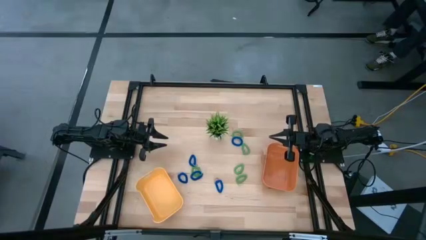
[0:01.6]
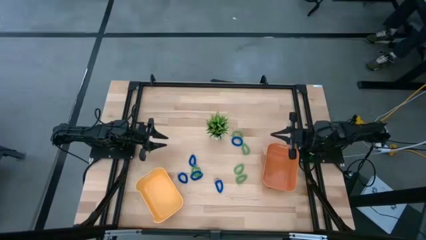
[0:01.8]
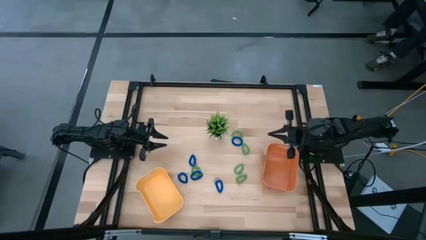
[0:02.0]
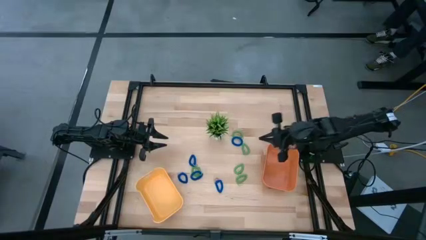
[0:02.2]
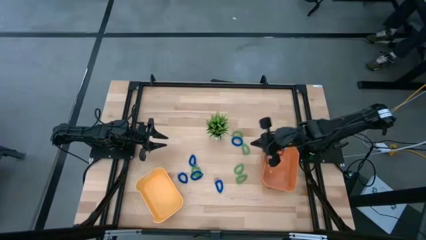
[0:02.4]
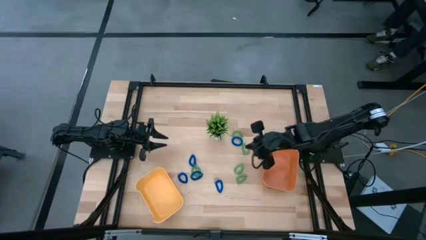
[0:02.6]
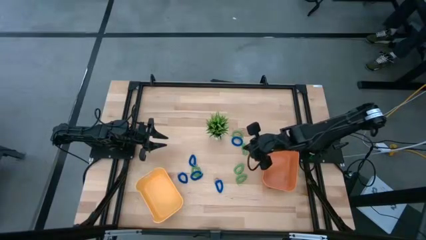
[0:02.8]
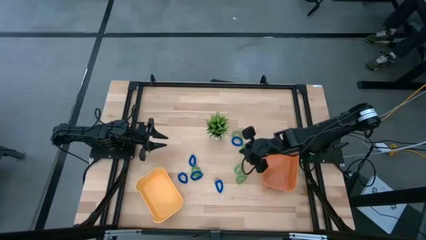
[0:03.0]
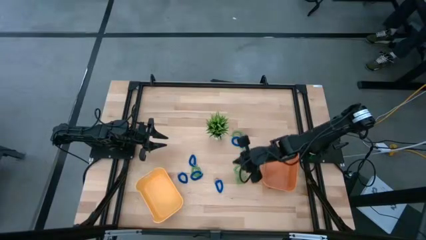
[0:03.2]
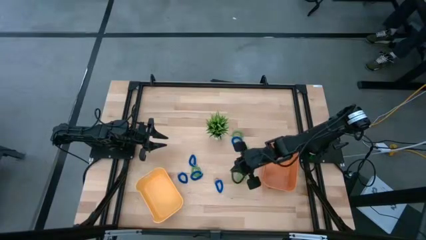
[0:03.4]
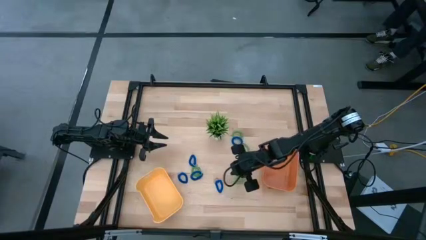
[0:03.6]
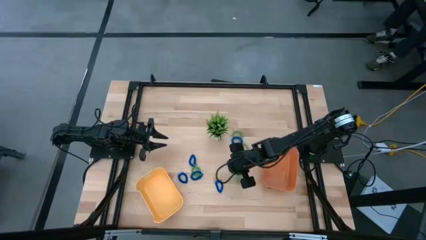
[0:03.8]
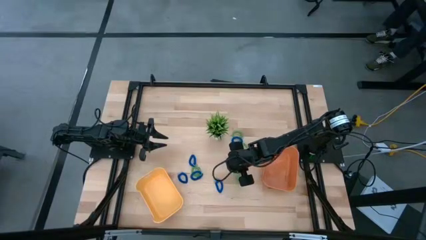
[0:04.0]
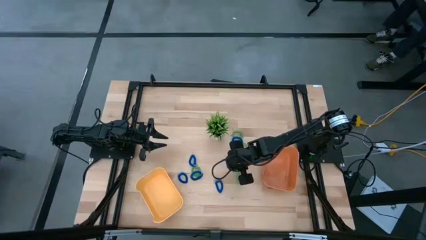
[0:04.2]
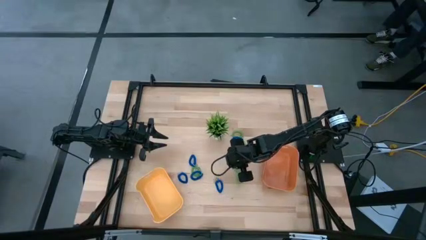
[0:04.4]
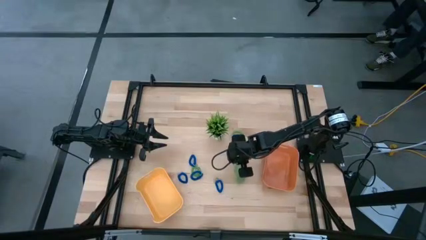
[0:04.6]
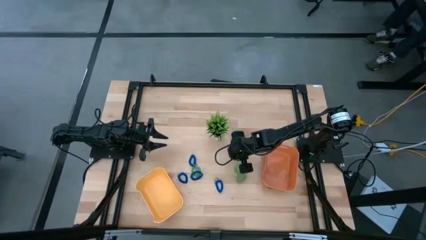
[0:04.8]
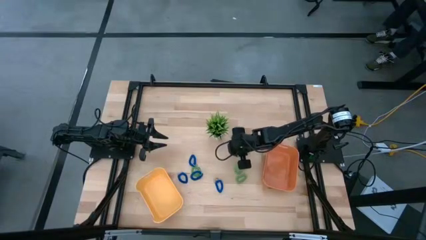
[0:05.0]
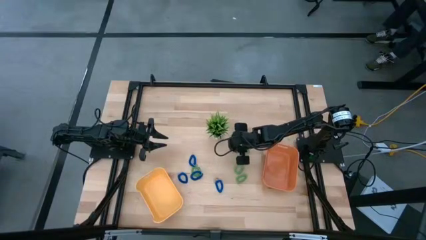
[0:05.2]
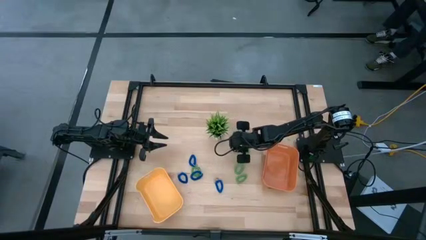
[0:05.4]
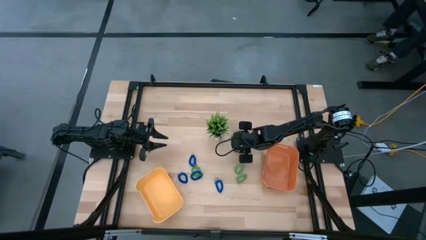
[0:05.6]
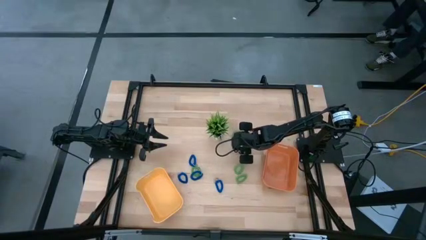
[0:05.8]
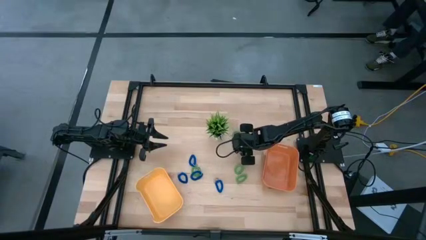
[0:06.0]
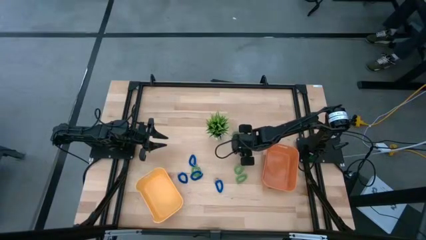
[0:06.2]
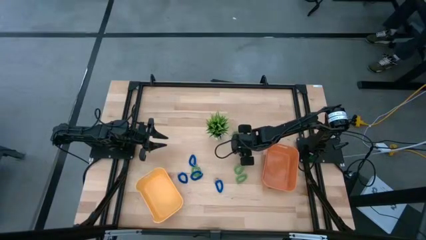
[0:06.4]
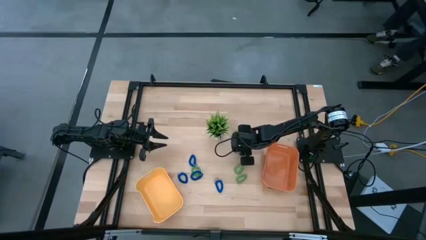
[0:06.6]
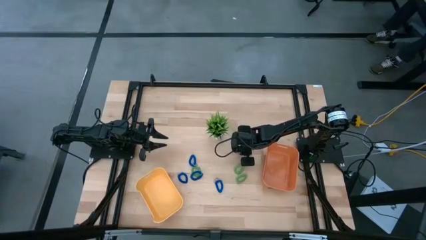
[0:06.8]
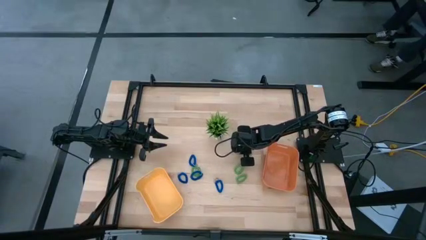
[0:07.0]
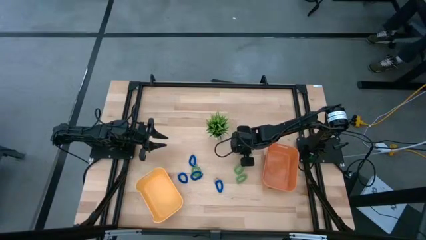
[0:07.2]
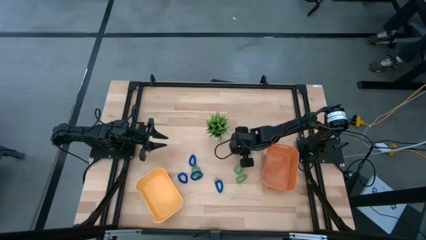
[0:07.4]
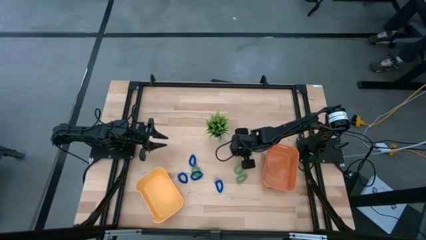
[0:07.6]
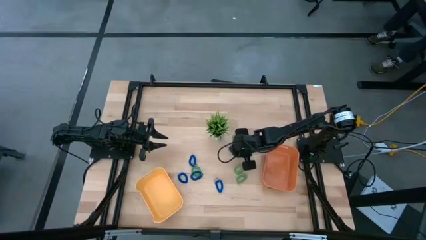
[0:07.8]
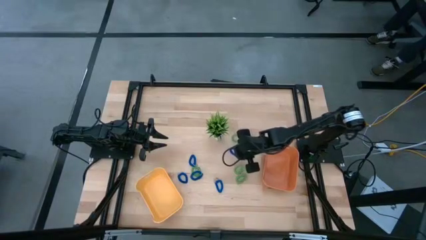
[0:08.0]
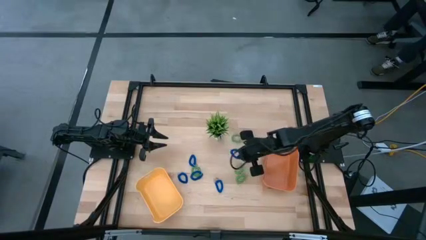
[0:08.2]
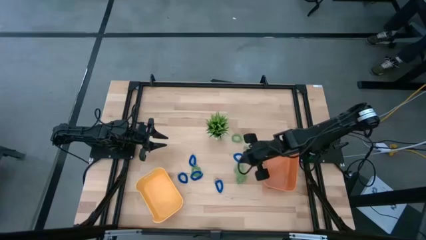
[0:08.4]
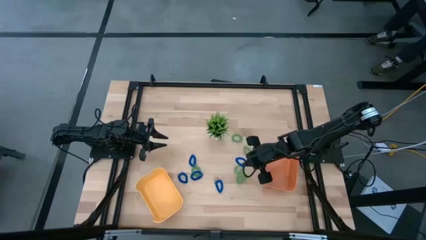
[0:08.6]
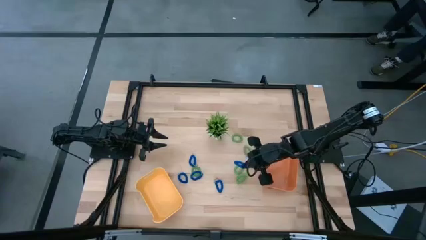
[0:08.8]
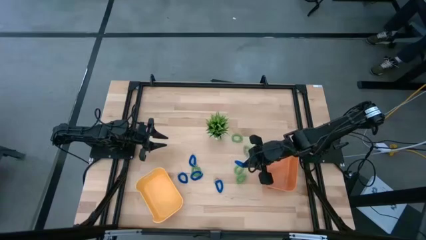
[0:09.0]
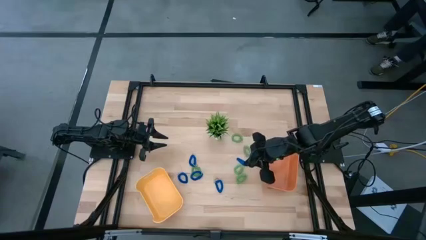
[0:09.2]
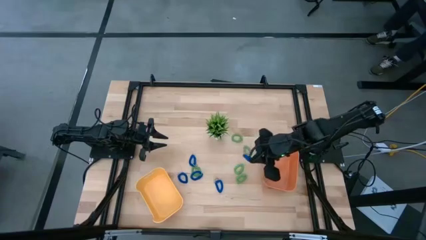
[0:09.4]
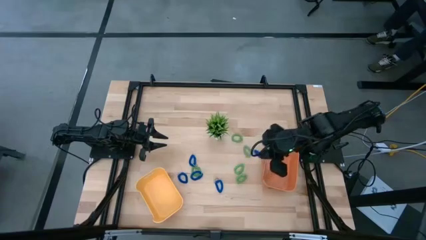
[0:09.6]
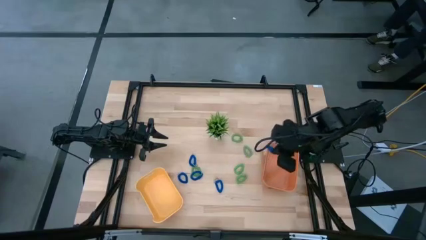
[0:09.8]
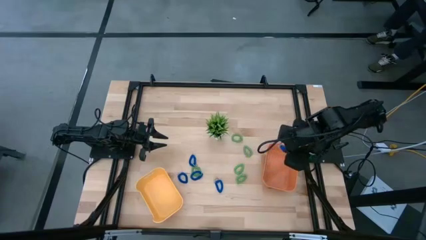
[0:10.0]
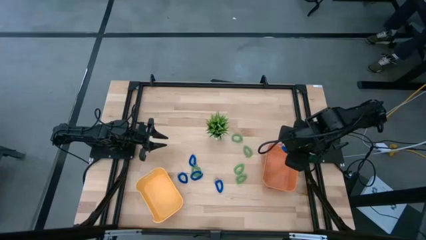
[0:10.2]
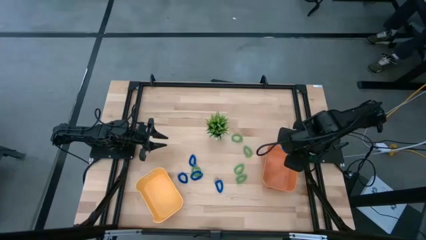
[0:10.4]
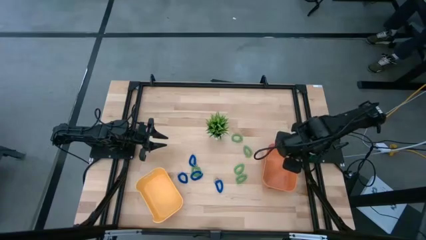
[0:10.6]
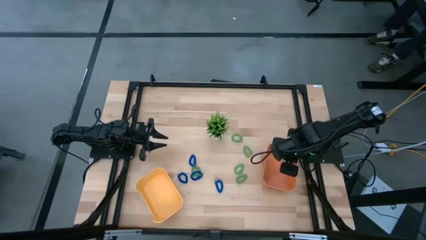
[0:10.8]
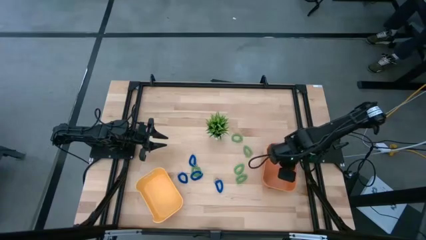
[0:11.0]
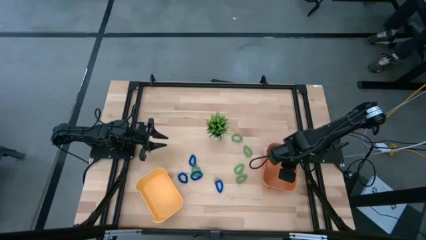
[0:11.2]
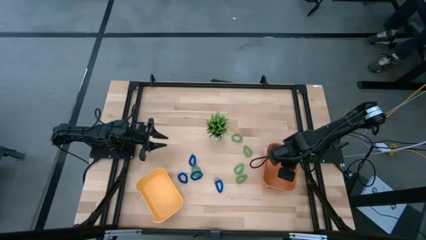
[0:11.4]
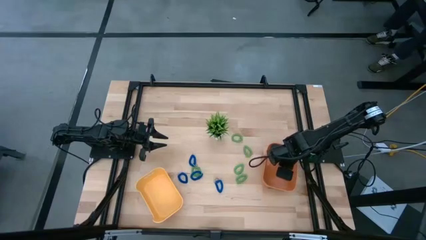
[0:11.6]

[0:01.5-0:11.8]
Task: Sort spring keychains
Put the blue spring keychain into the orange bin
